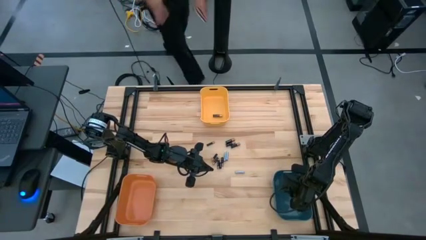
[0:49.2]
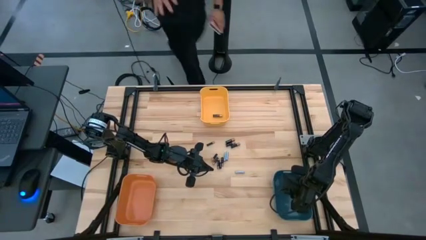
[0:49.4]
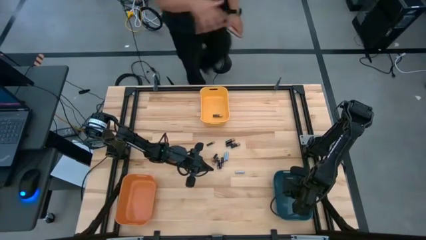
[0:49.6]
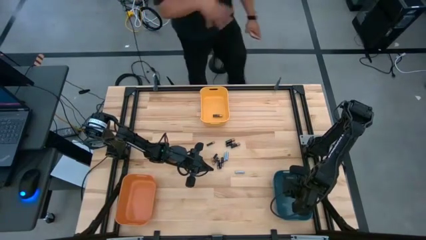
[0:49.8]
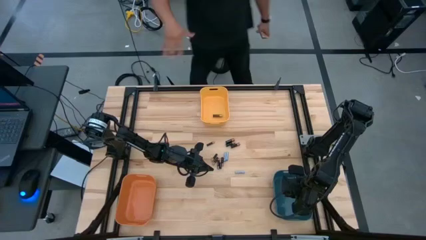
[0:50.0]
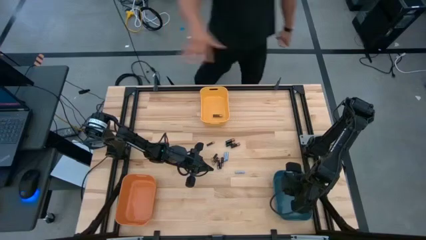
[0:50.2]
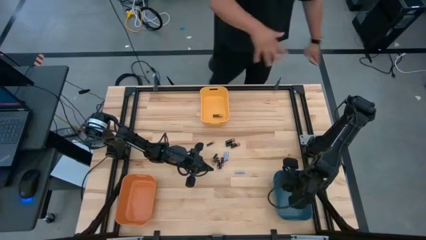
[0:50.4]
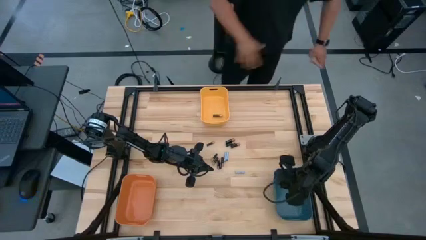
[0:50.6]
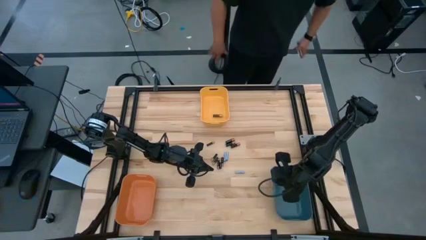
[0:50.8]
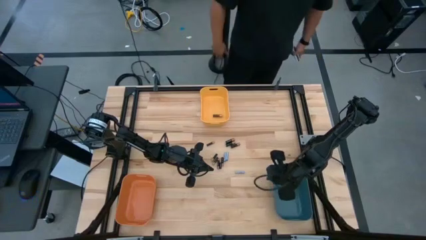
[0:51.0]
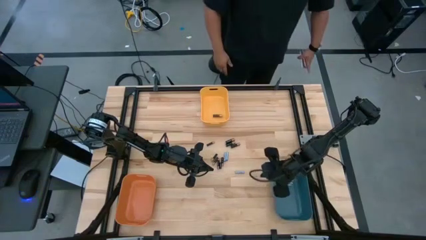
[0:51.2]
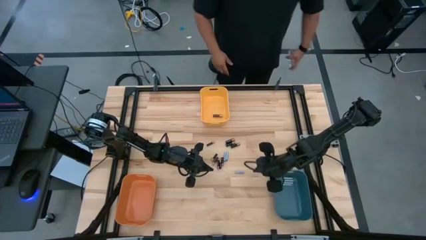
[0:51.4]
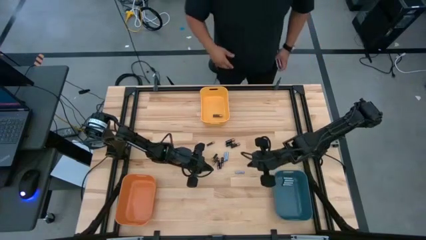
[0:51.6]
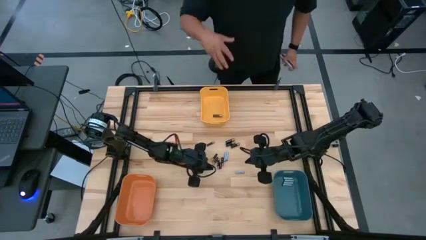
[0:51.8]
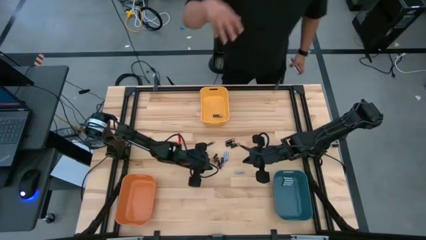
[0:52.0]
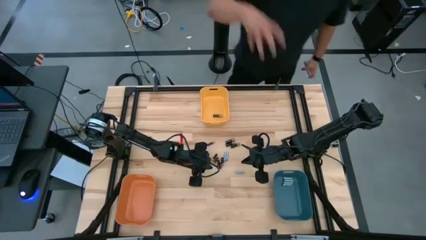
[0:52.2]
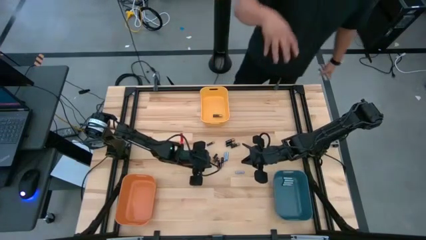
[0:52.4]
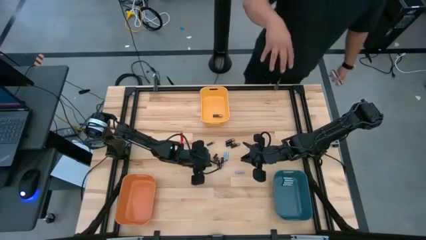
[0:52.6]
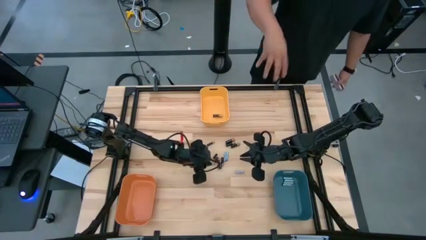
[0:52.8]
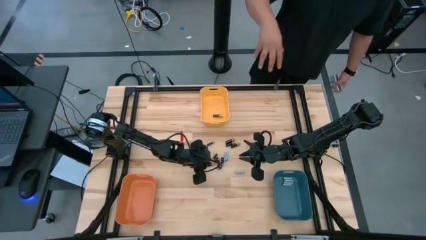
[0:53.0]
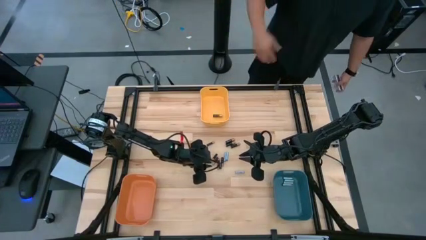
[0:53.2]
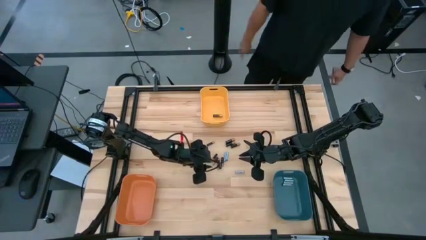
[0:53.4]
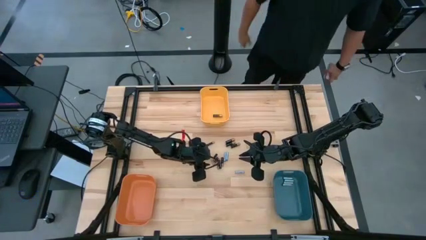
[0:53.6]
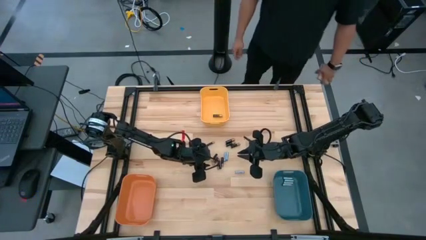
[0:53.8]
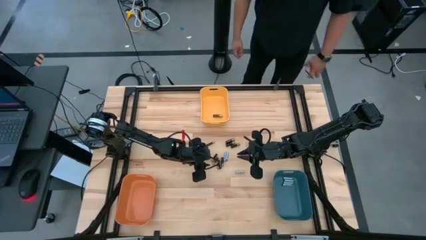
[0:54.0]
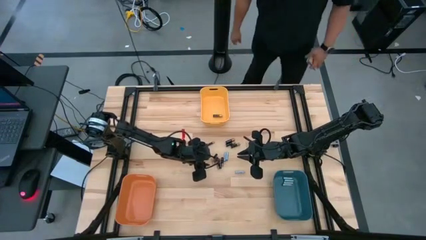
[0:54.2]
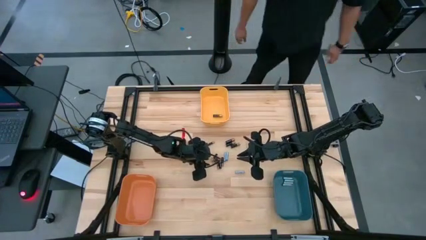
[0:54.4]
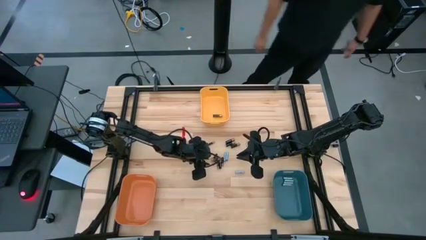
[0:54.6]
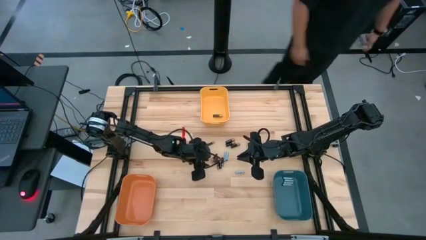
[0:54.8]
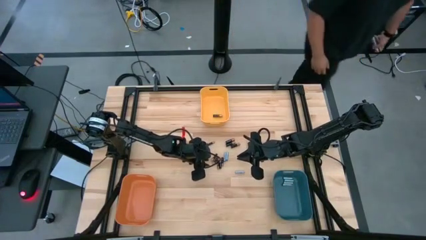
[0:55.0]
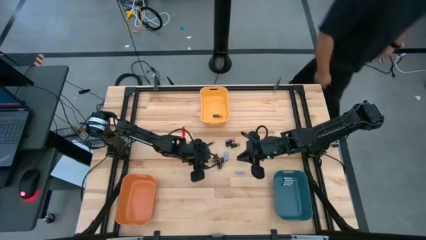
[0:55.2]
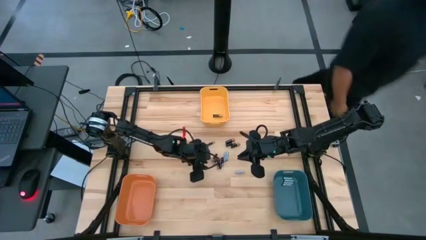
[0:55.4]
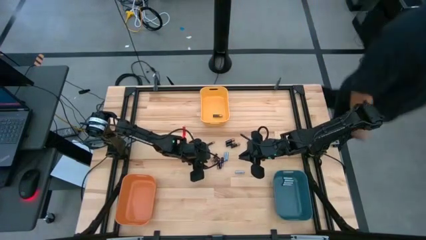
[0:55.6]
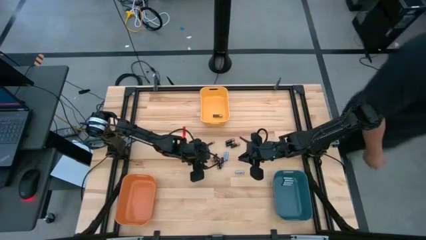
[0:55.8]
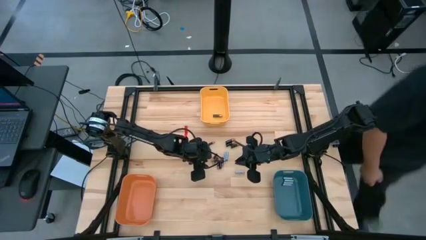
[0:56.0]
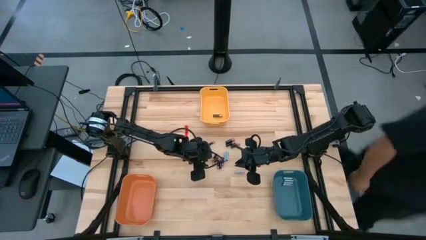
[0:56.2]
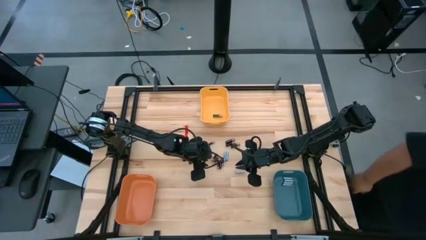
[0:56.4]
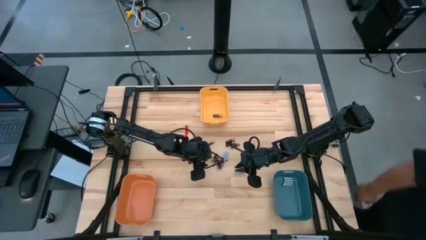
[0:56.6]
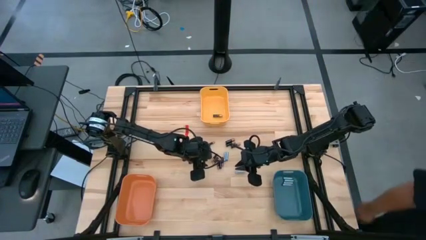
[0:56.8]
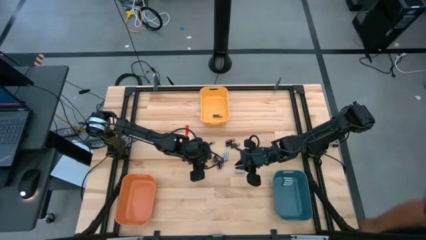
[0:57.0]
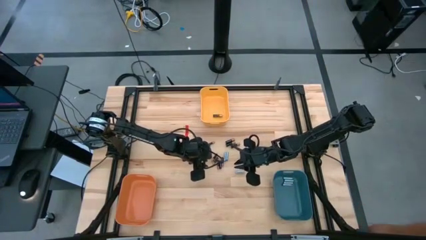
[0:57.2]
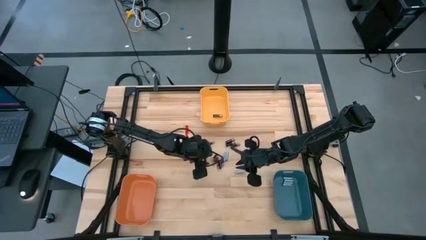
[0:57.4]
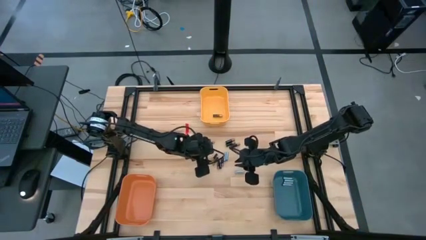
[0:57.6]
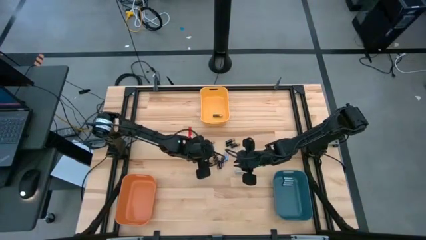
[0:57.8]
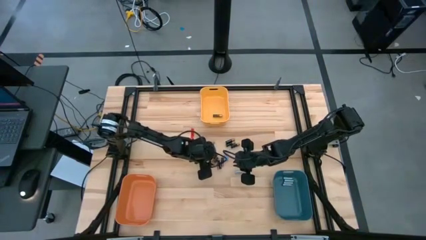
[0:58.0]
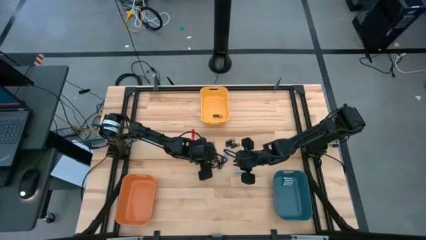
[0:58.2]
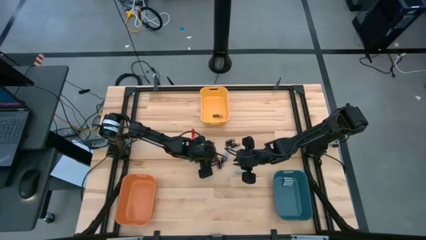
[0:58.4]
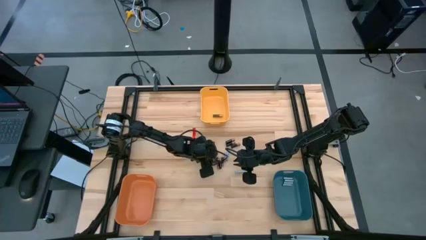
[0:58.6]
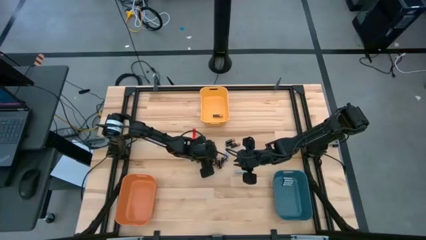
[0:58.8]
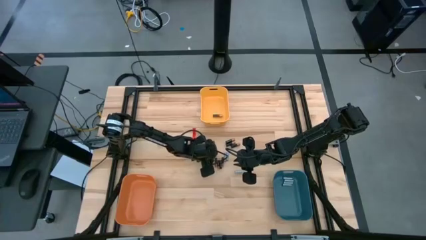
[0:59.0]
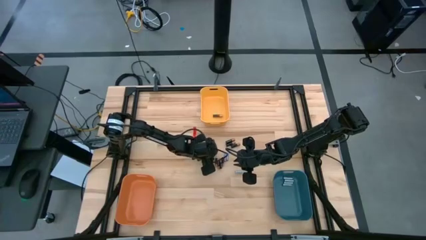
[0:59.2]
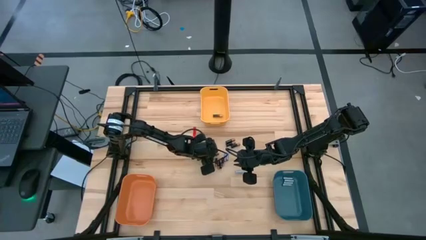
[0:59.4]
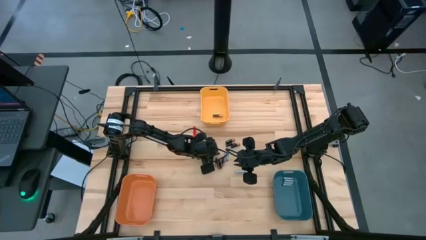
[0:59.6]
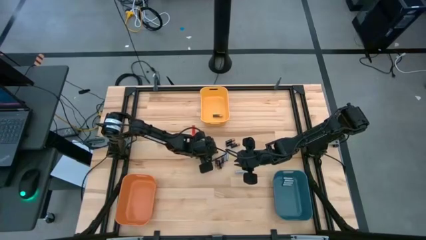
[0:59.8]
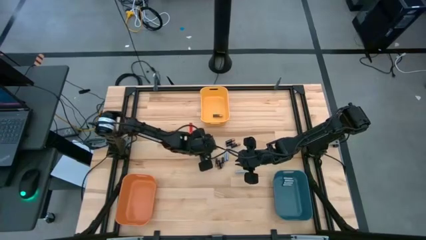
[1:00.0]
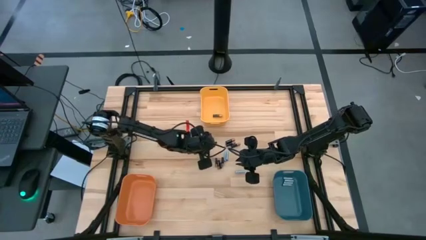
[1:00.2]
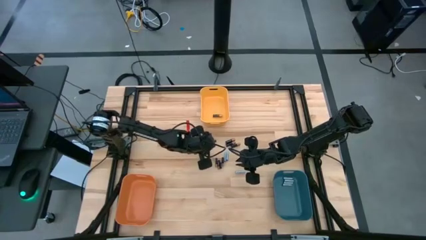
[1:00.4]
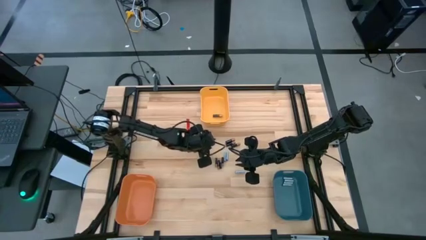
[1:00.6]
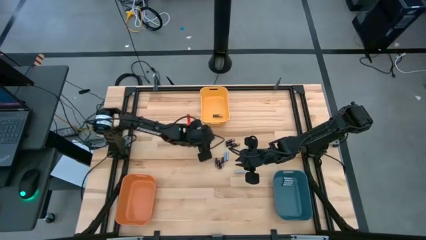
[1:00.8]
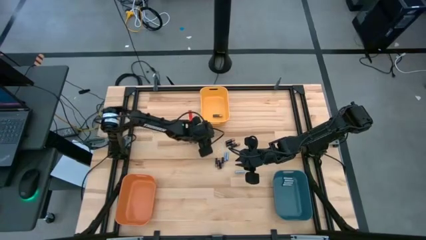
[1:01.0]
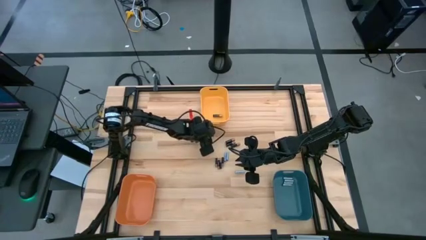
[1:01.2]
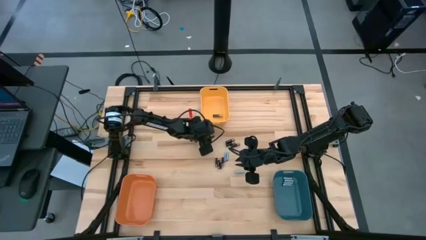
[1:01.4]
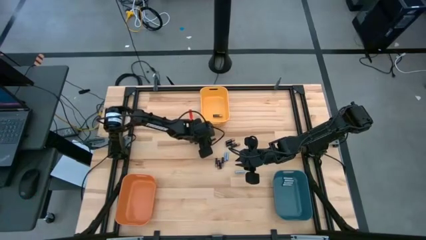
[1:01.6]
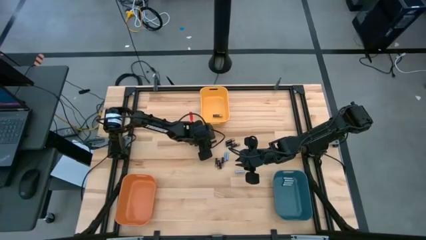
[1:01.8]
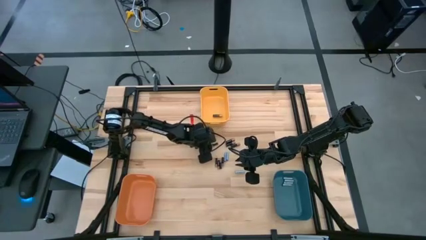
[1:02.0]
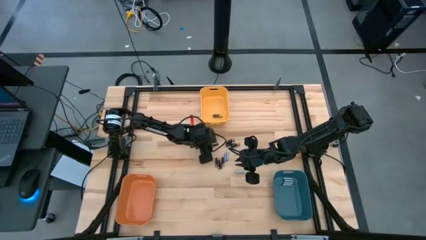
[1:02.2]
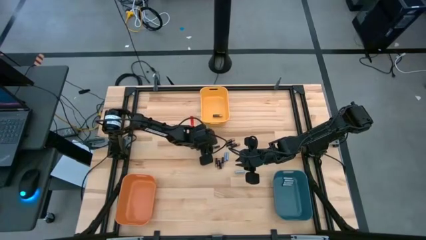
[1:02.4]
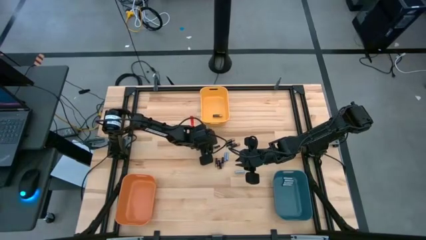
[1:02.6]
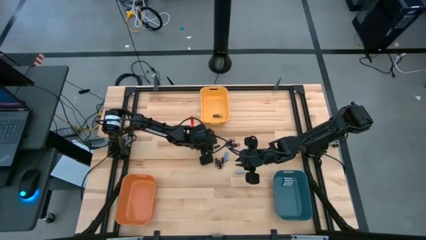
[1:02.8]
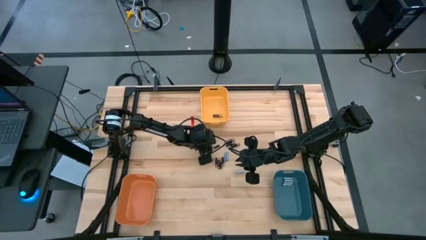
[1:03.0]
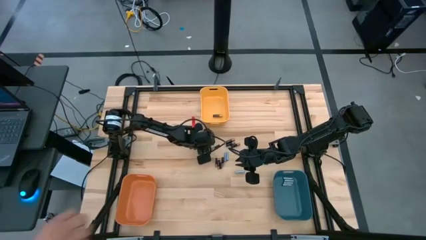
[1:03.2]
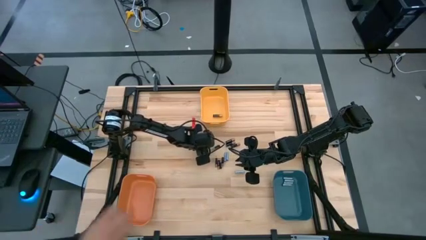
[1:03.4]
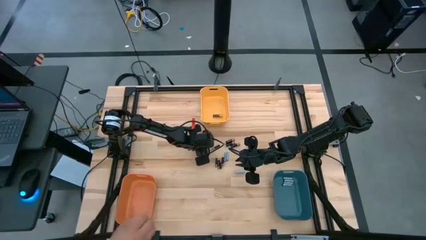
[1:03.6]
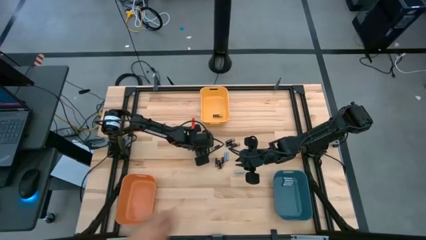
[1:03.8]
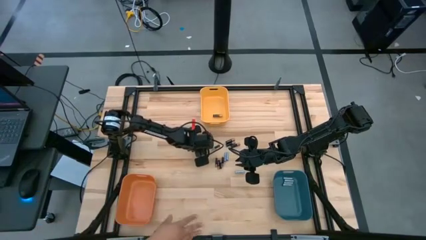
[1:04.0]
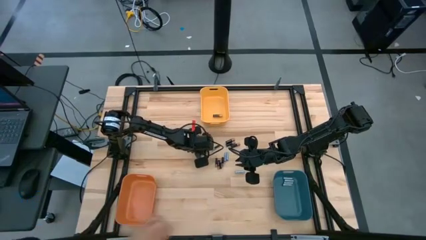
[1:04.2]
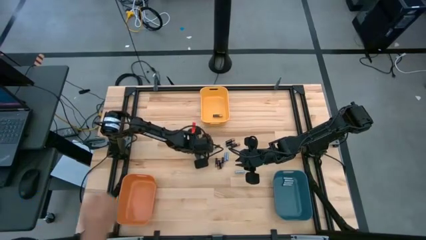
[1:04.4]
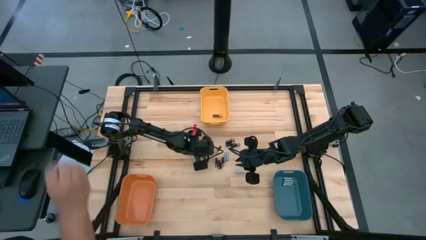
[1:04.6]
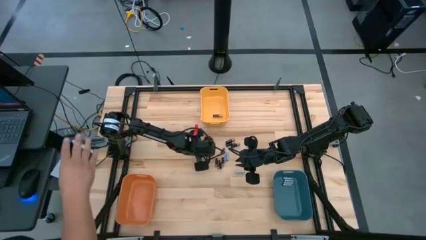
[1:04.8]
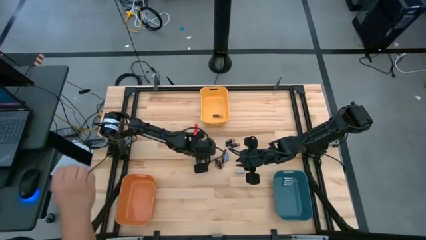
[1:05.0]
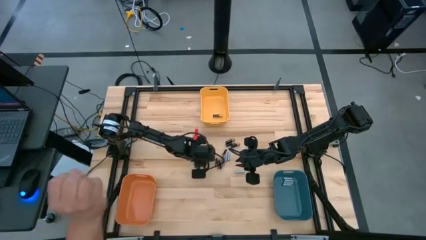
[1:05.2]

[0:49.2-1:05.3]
Task: Sort batteries
Put the small black battery into the yellow bin
